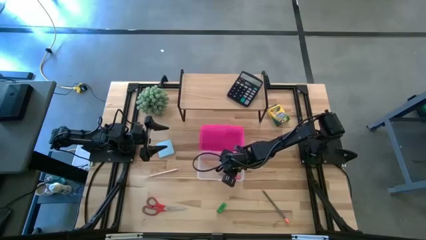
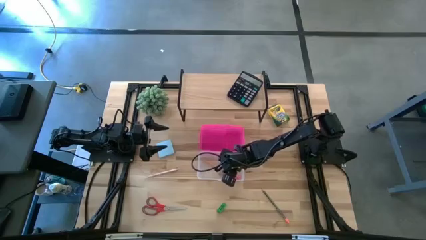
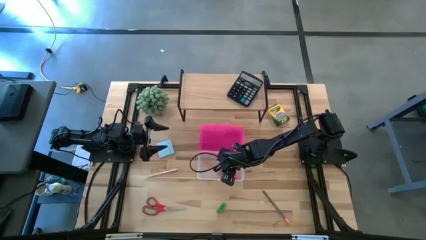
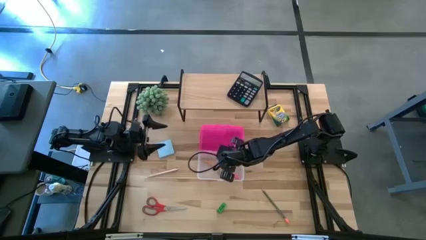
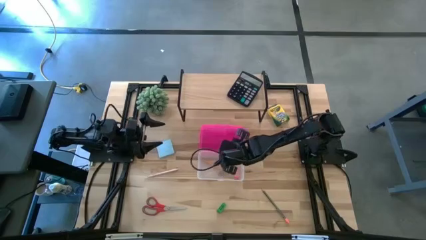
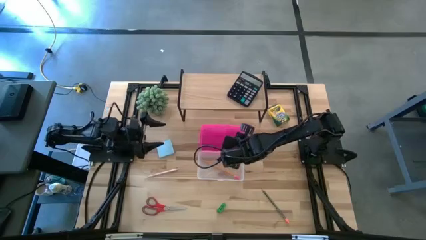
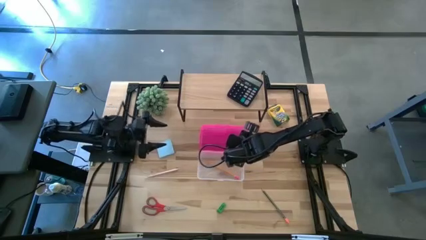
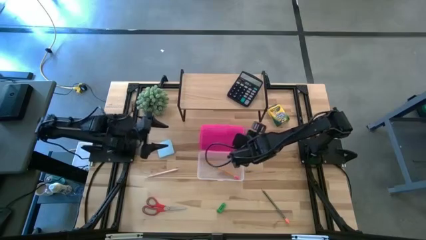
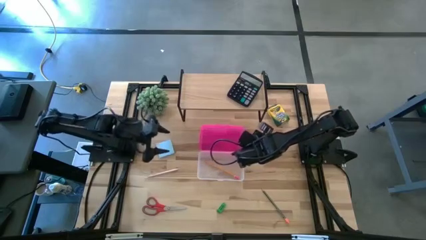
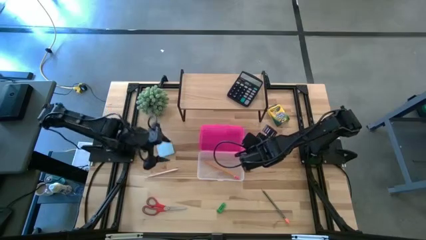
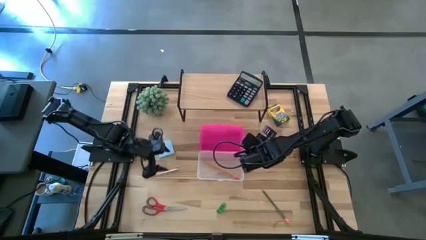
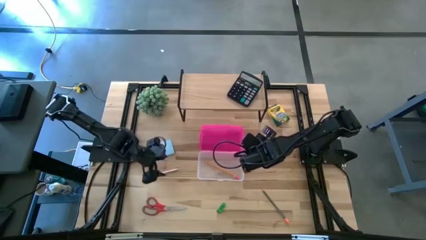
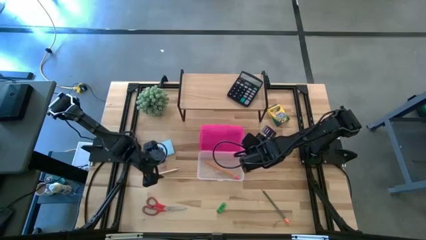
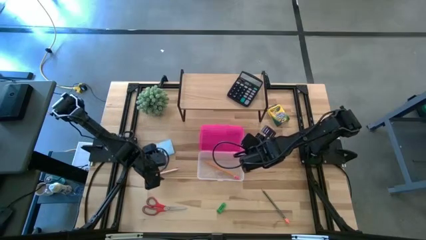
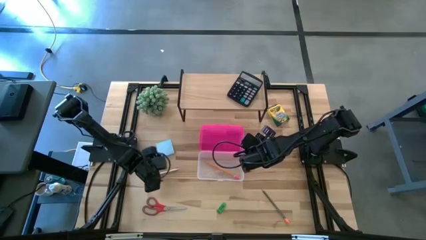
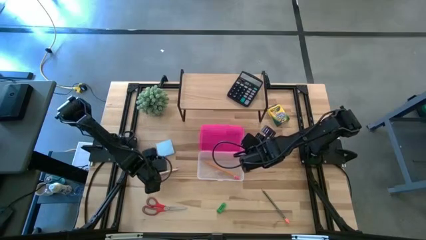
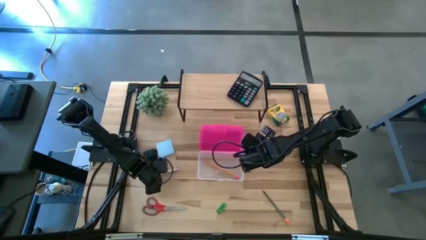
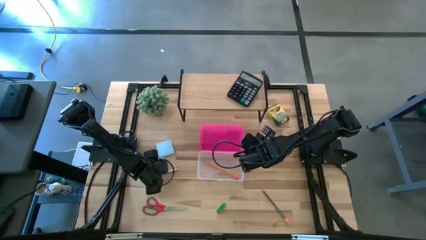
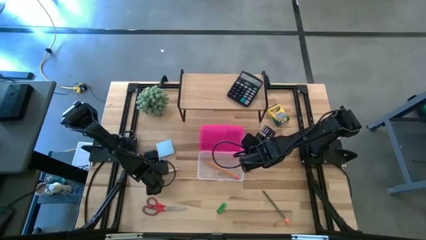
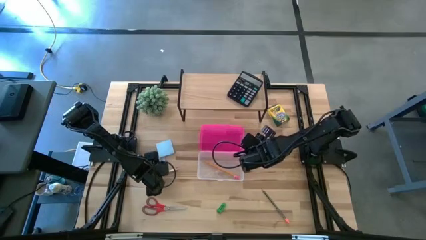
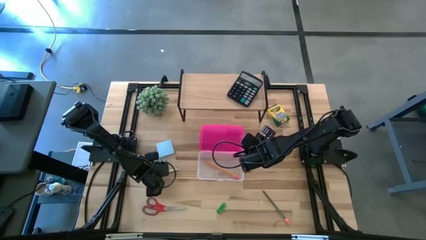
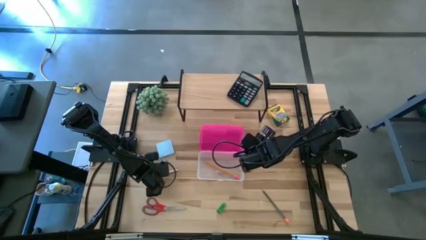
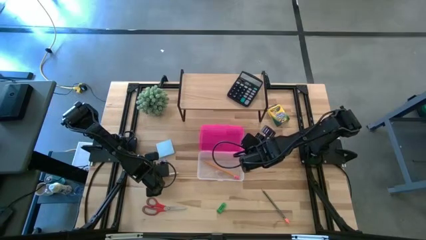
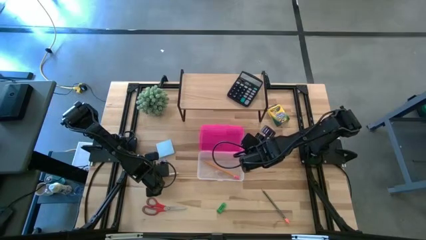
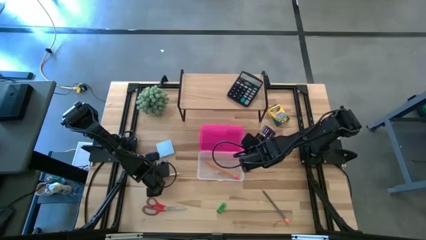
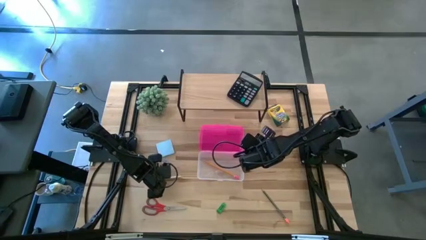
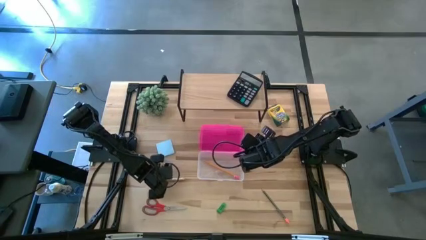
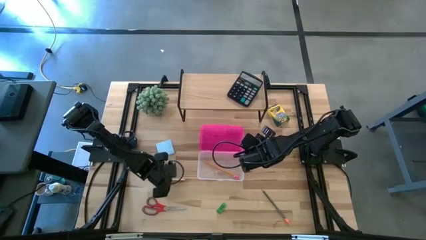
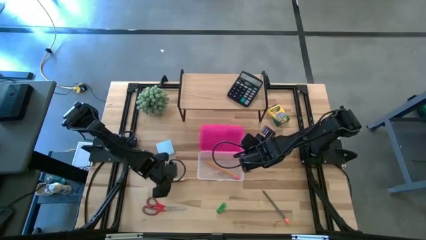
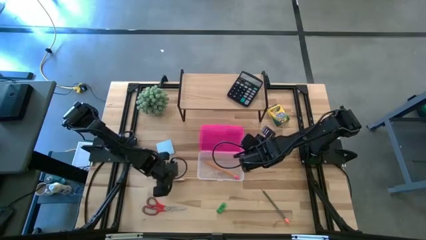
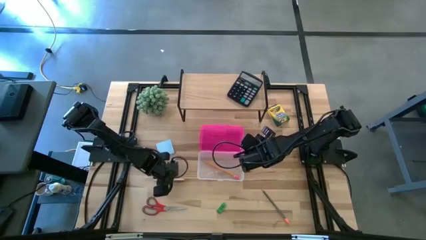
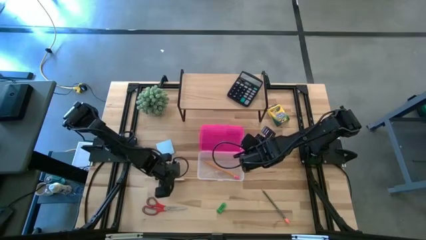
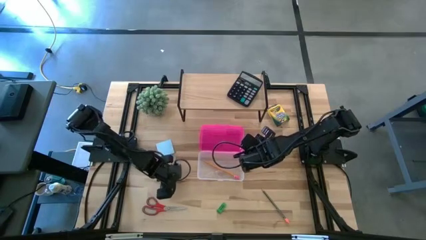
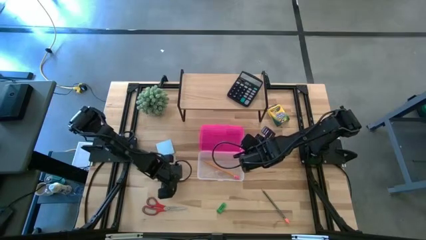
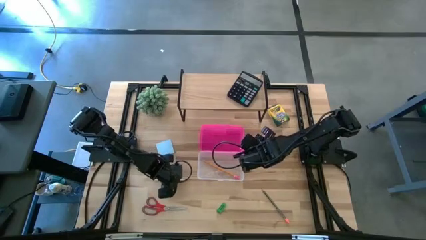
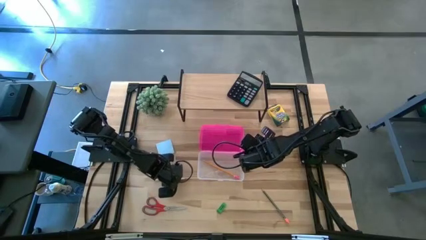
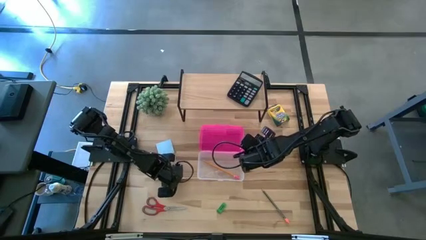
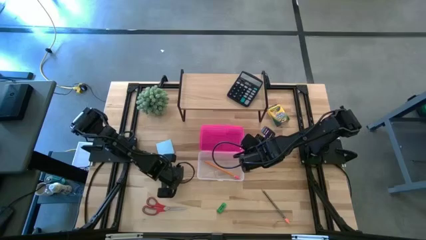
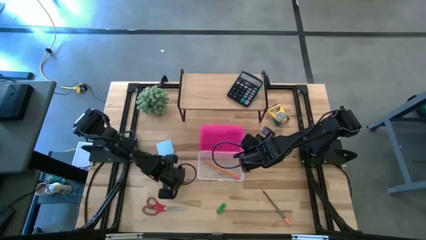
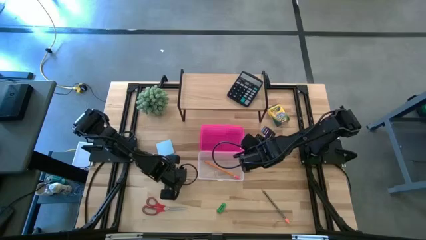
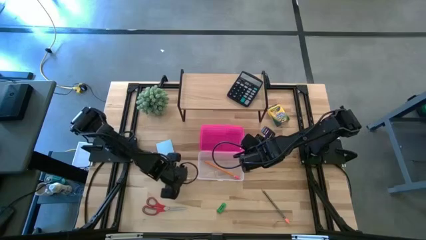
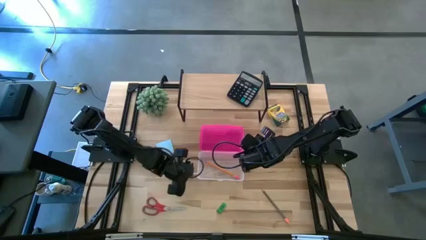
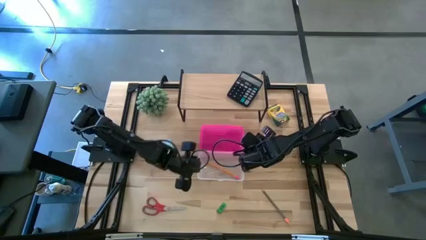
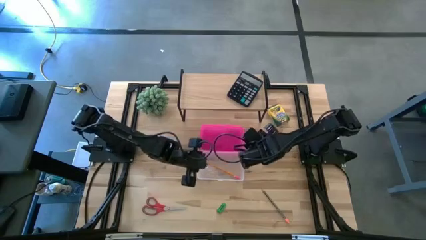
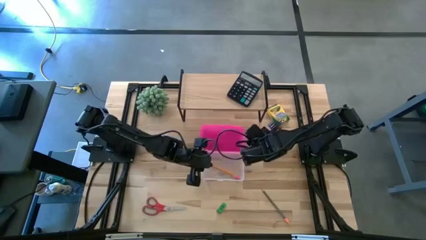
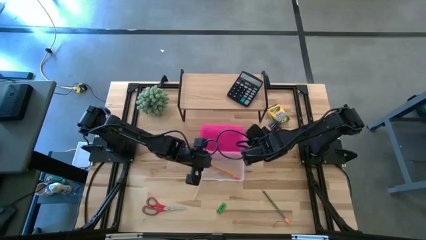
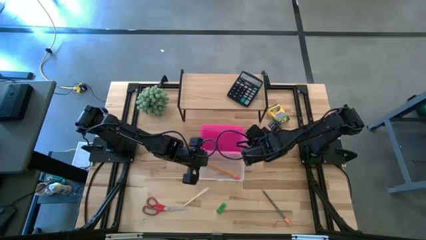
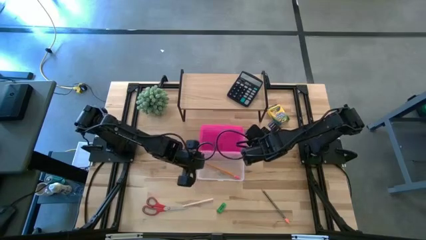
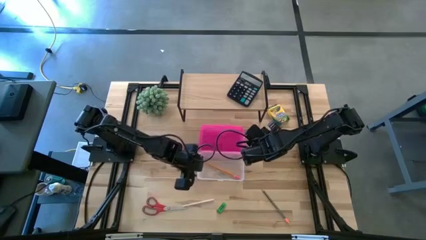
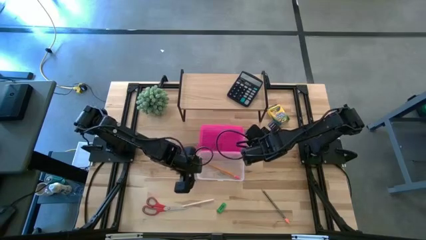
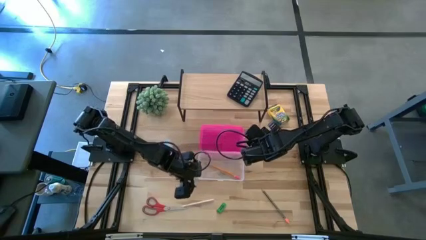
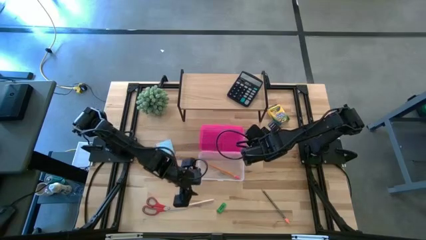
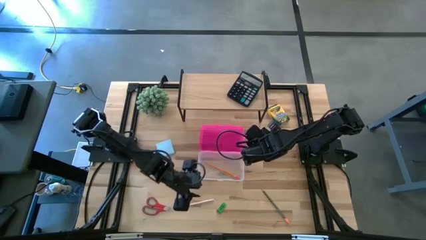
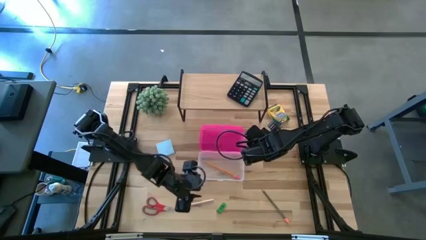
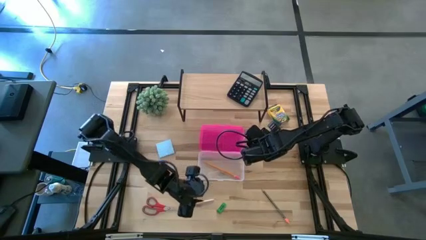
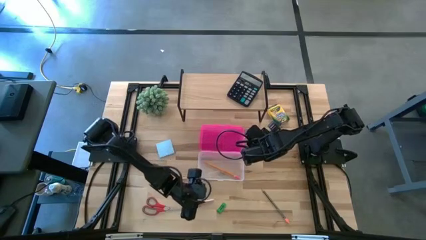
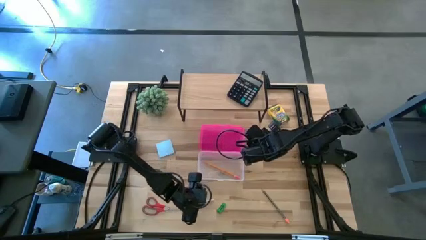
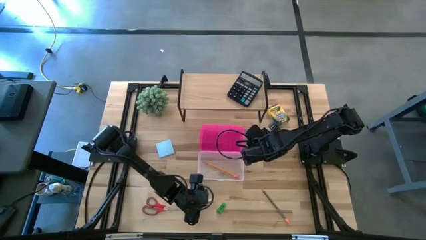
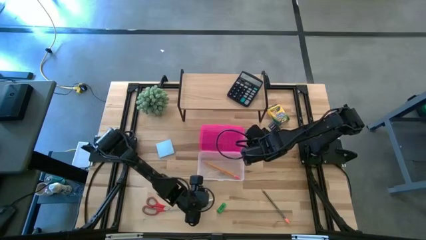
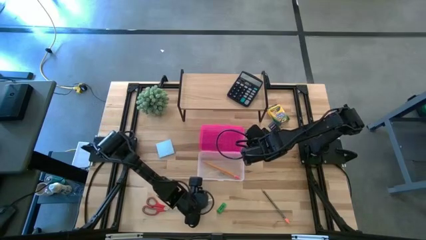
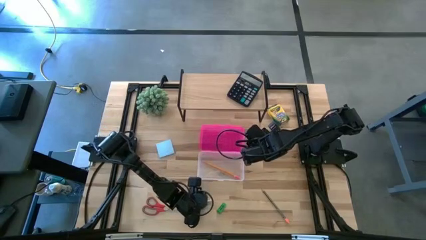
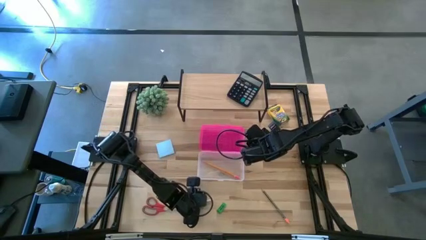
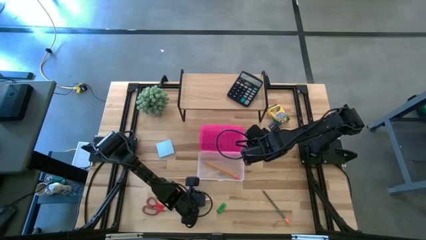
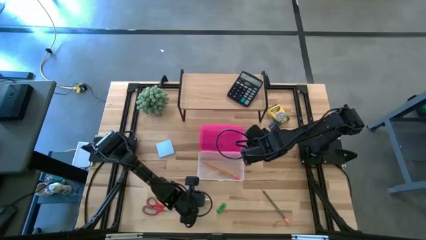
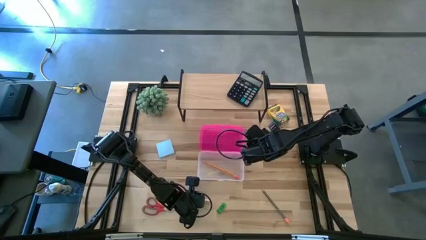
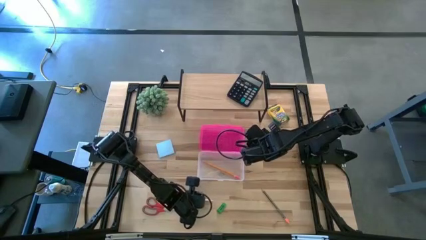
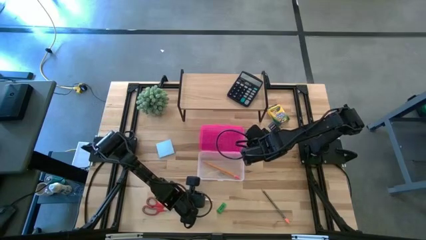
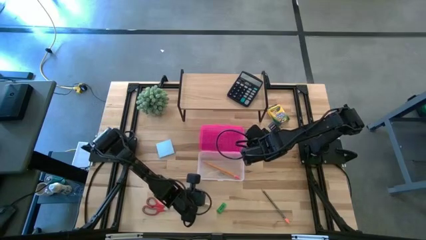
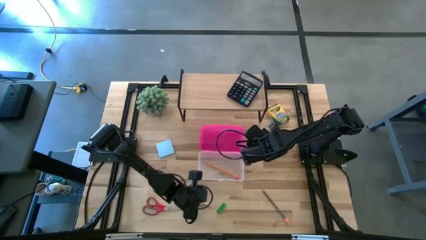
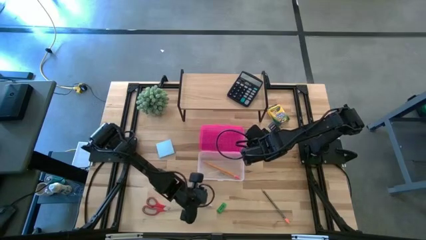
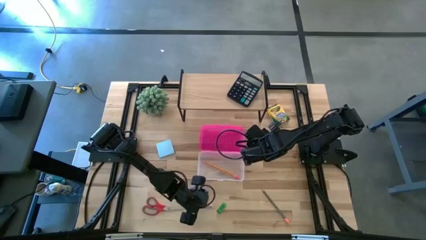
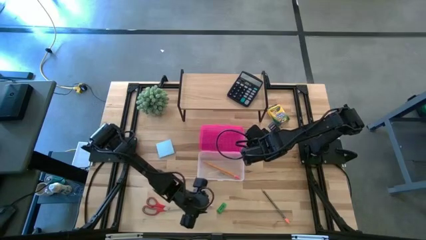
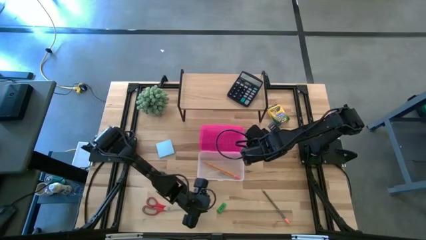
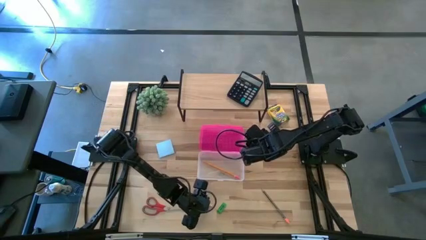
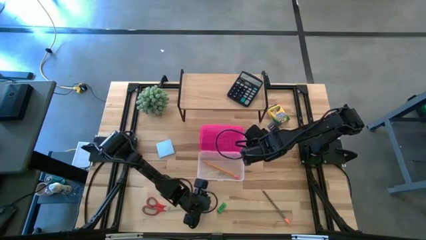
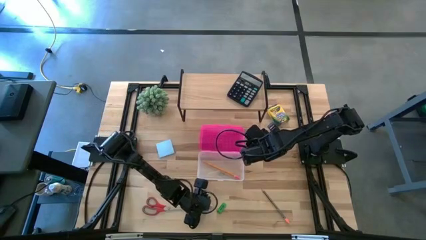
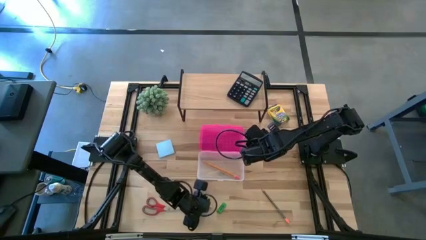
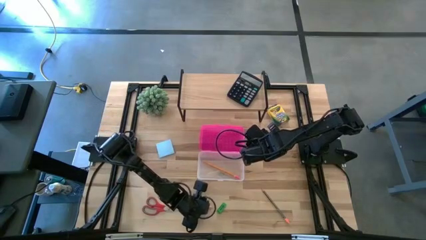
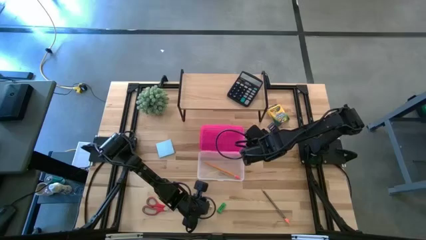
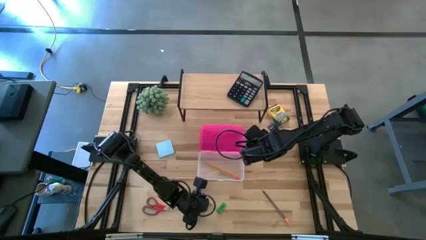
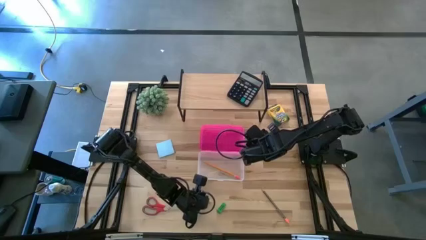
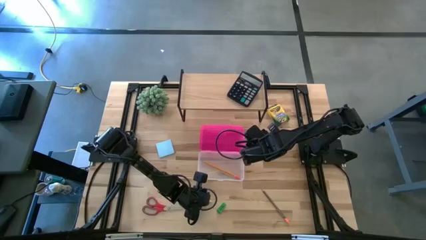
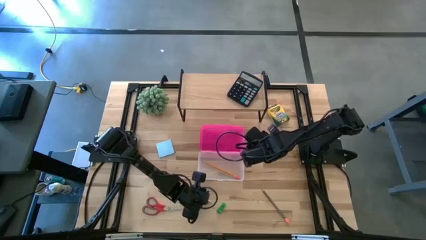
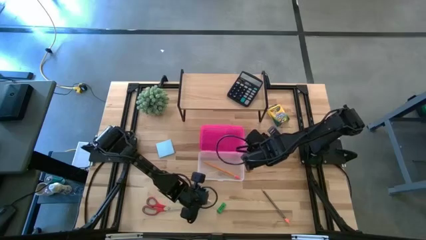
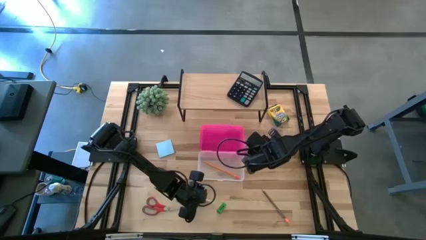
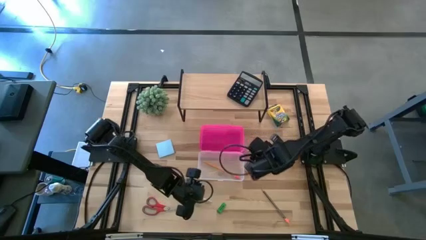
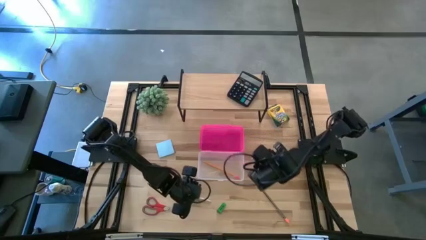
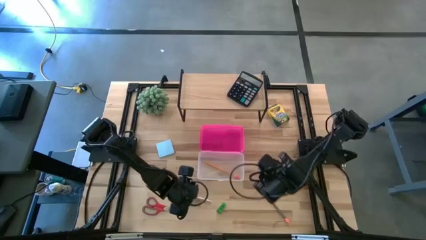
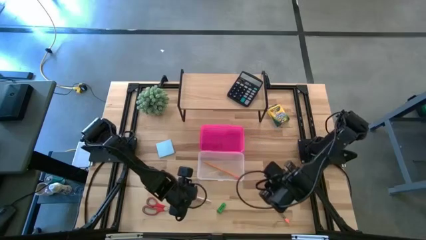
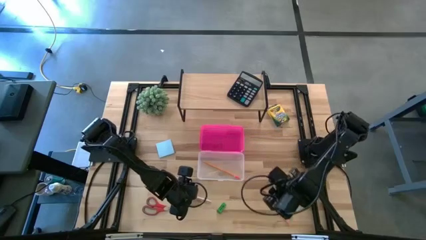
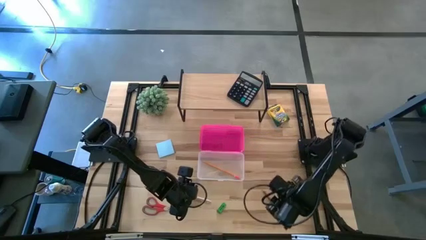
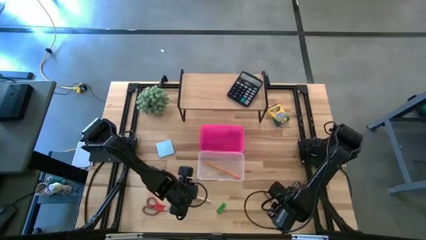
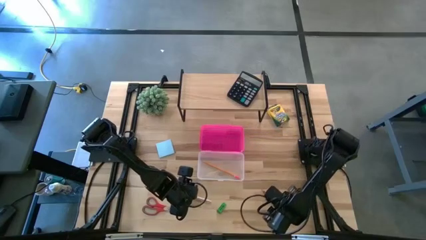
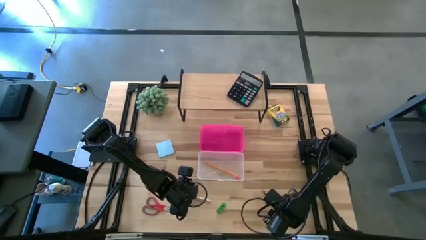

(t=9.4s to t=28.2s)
Task: Pack school essentials
Put the white pen into the transparent bin
